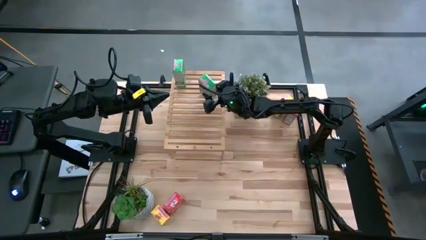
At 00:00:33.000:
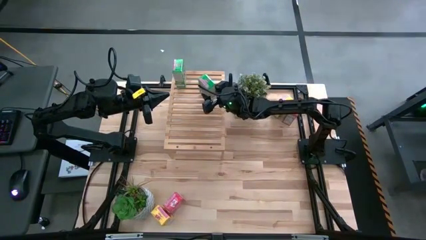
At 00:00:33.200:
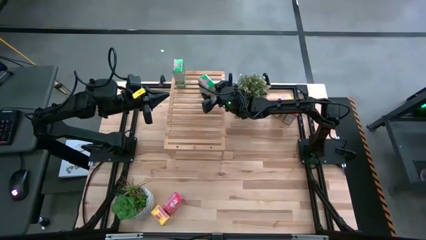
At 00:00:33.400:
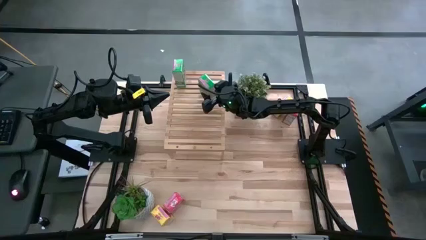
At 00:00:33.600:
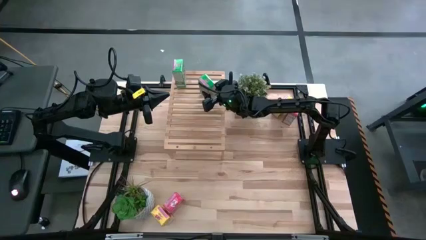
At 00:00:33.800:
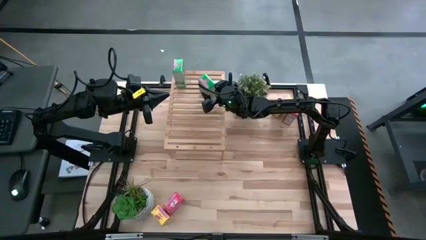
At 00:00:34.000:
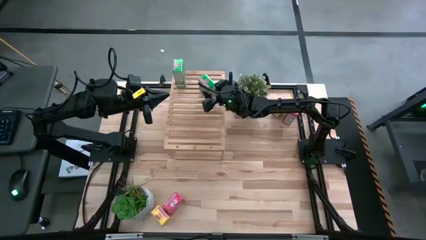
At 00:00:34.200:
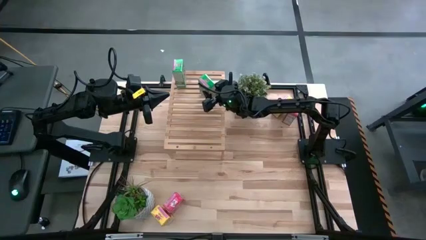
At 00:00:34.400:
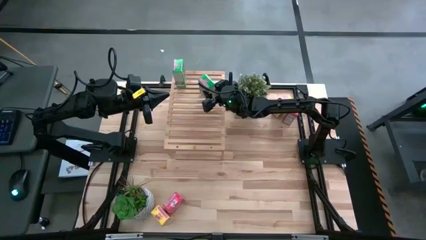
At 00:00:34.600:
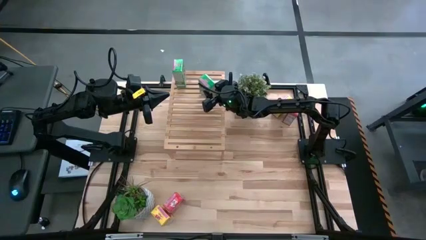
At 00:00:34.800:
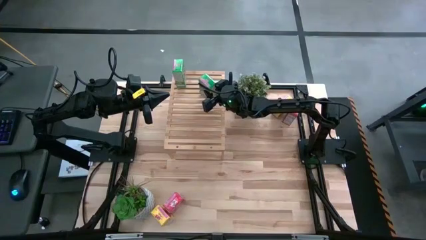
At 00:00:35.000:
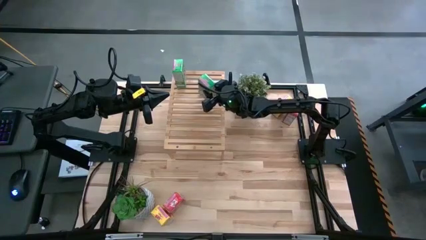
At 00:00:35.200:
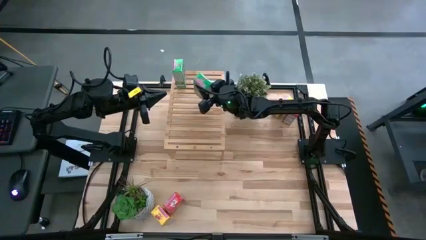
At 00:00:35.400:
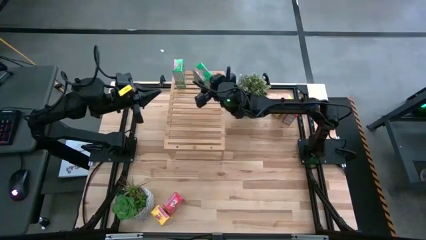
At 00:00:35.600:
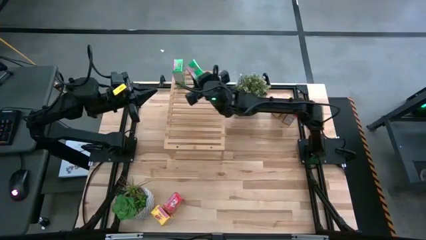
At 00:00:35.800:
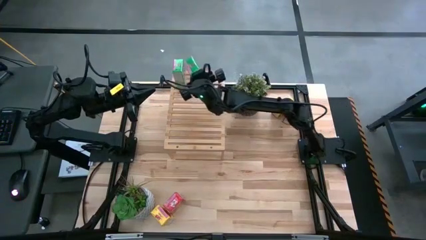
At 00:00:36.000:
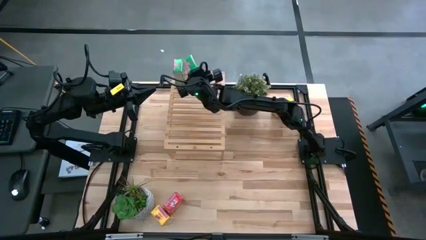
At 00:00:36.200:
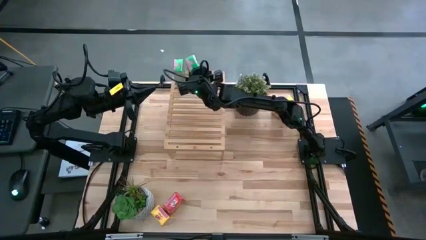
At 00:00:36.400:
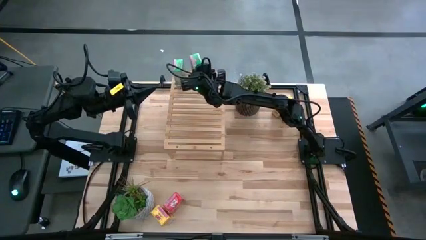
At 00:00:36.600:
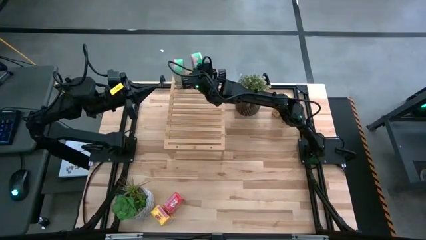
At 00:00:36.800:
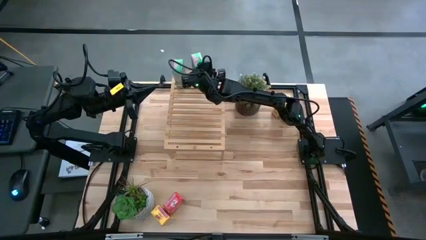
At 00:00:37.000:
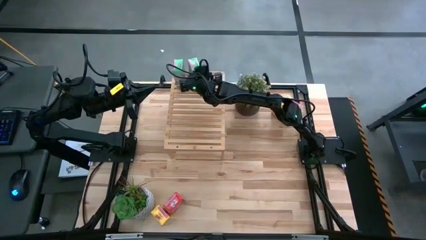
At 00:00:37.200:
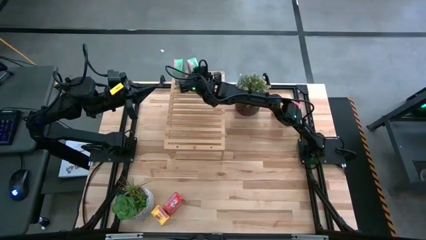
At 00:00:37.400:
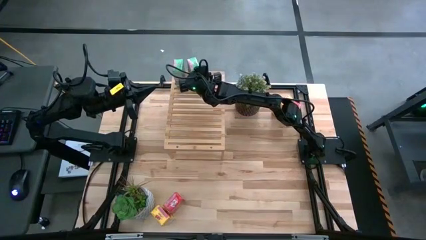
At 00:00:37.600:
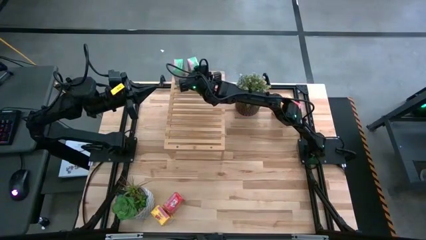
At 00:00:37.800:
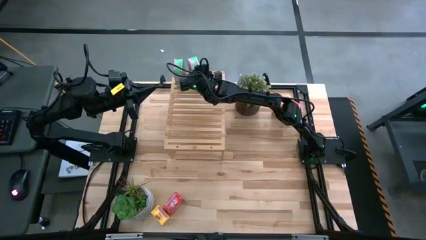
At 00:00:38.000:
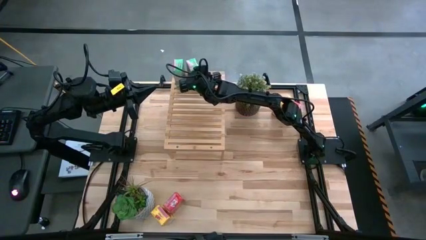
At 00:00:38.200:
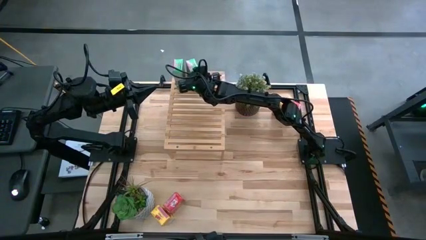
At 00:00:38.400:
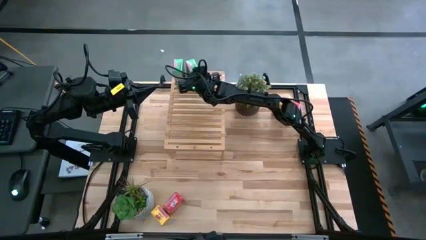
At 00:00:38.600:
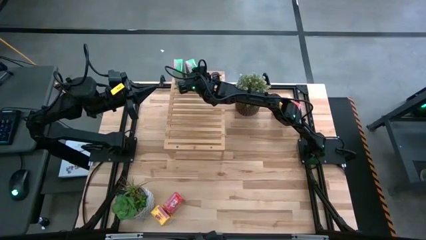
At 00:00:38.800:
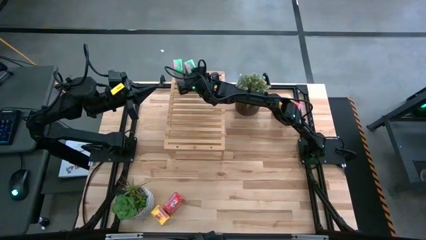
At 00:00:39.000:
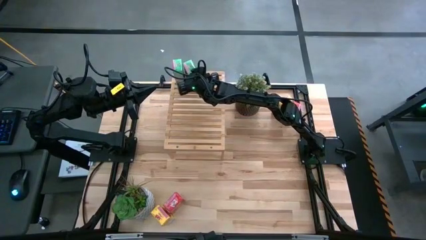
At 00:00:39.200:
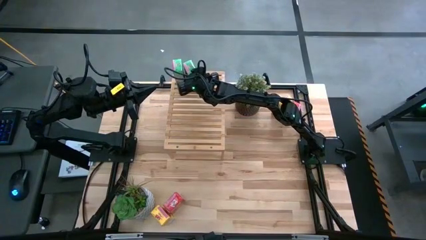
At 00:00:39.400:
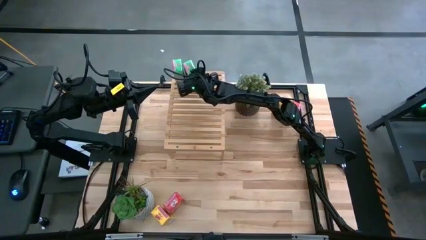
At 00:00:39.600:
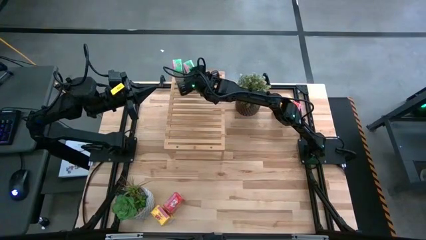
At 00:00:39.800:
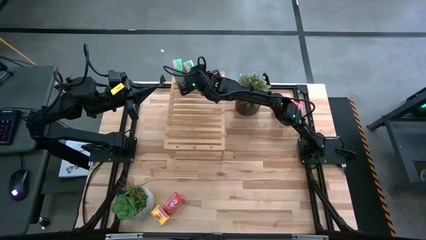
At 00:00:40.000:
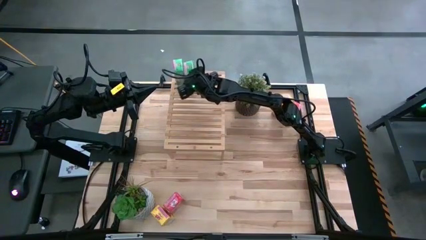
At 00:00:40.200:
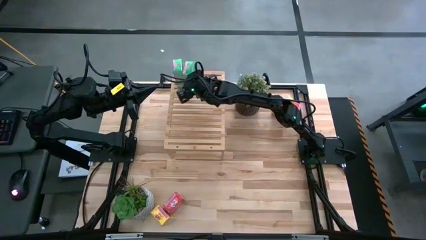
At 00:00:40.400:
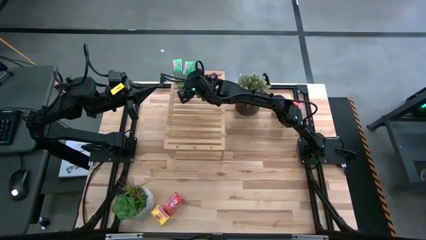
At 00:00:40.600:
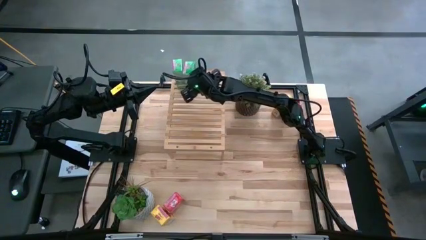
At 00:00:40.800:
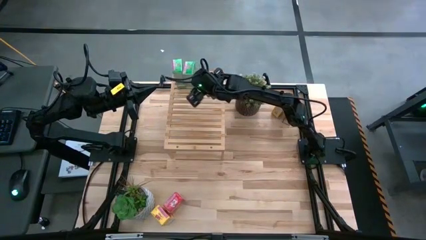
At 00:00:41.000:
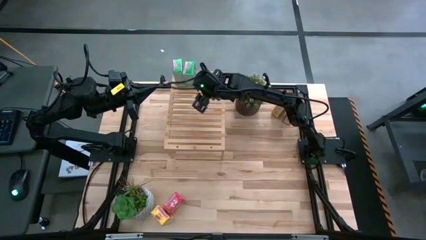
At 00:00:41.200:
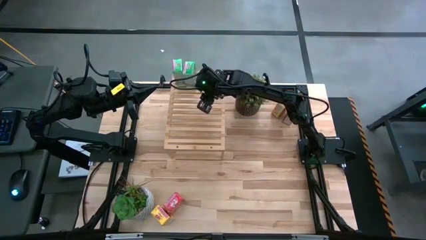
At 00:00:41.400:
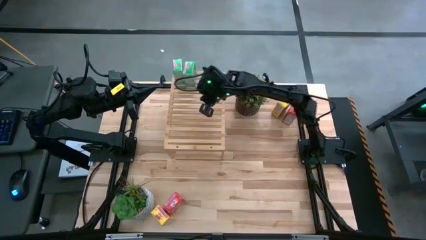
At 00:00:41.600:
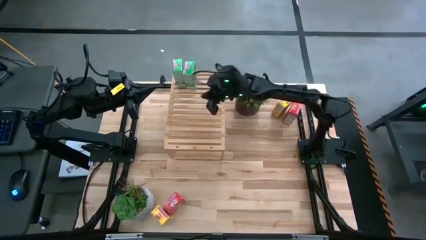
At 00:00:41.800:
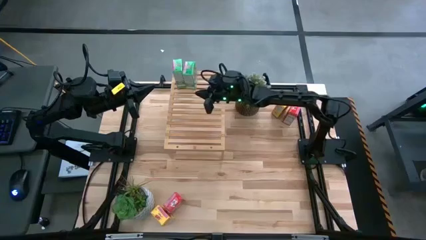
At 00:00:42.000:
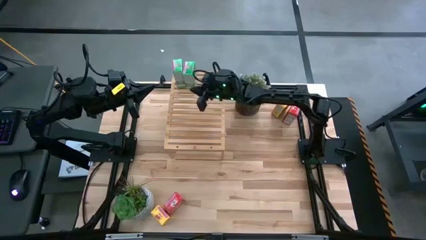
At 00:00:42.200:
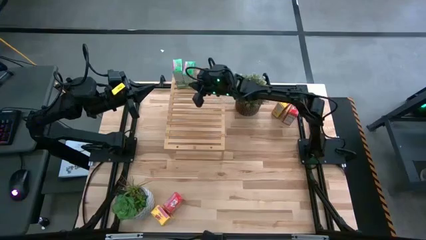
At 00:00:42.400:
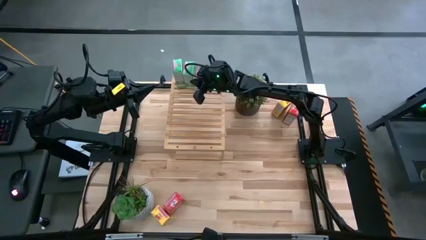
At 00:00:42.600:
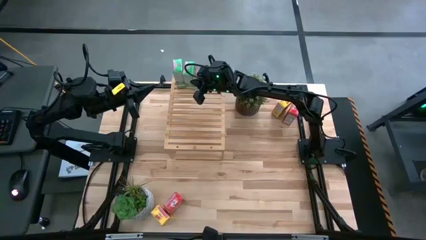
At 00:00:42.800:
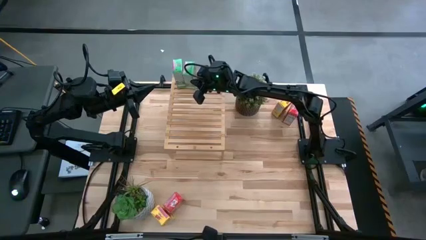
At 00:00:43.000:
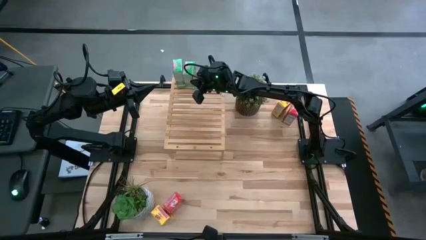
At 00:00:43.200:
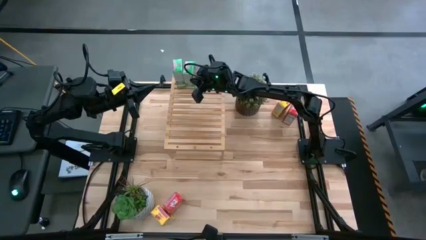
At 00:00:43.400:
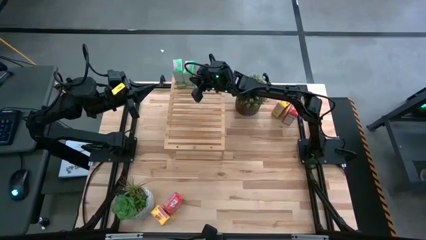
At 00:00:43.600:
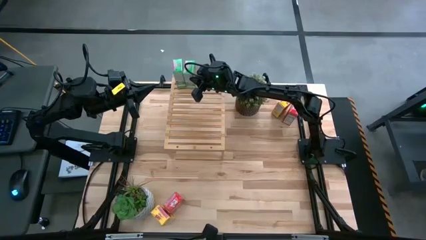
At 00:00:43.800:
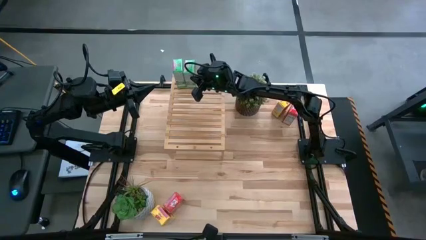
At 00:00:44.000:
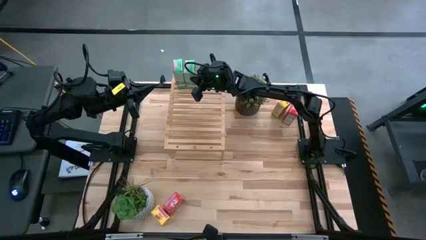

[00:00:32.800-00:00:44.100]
Task: Stack cereal on shelf
Put the green cereal box on the shelf aligned with the other green cereal box
